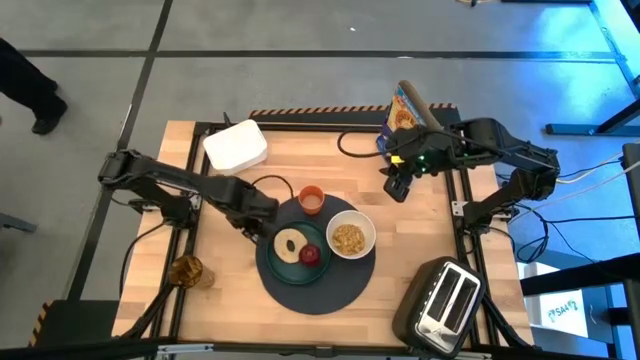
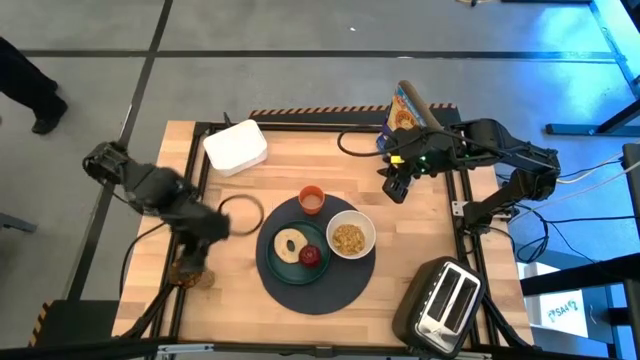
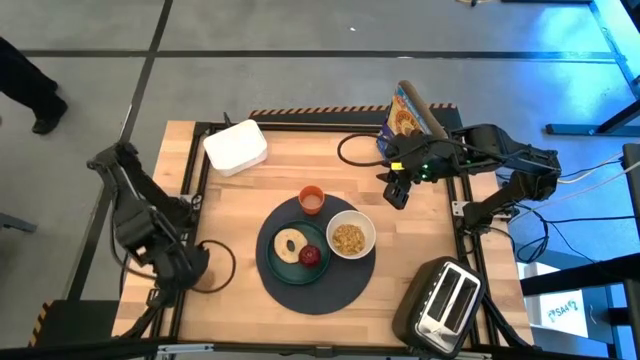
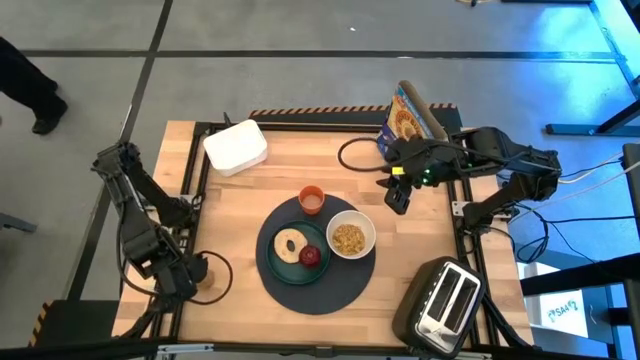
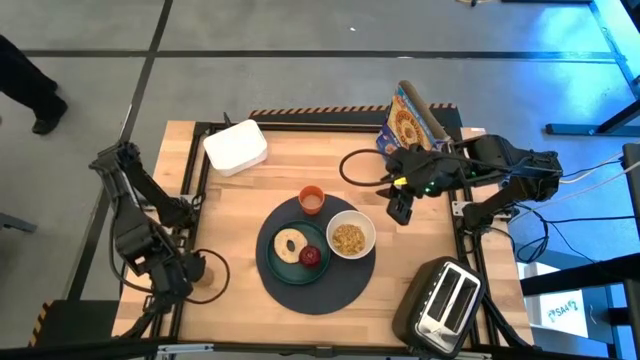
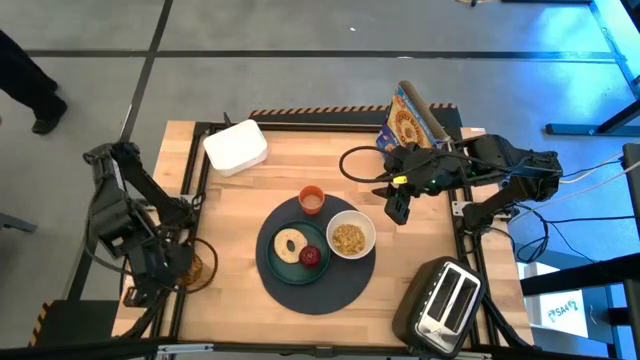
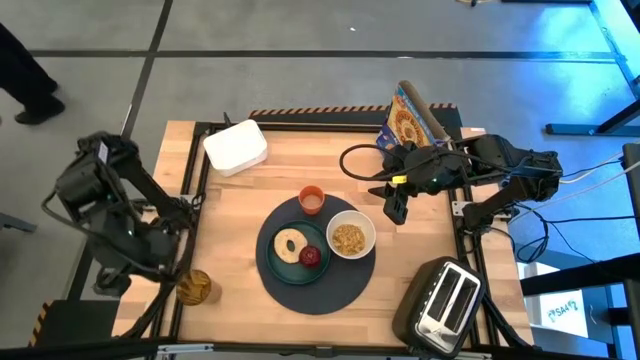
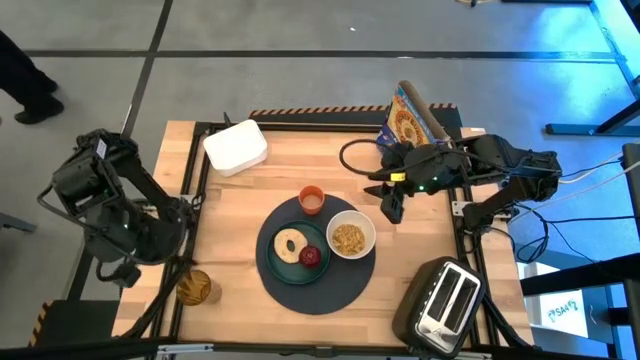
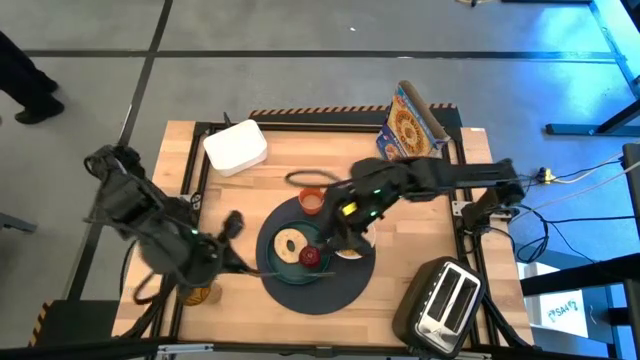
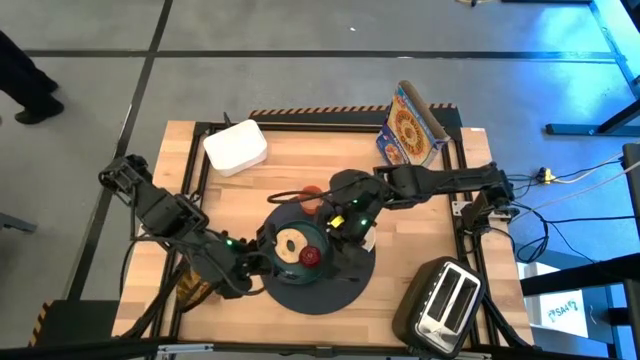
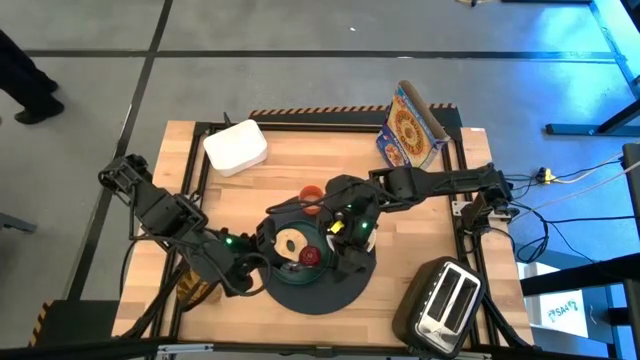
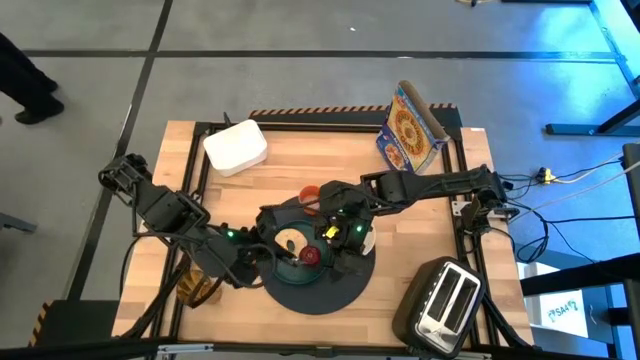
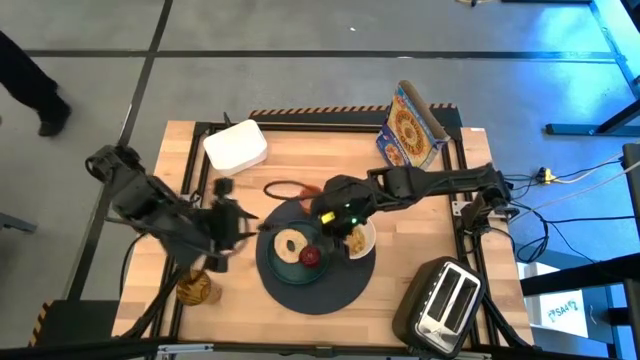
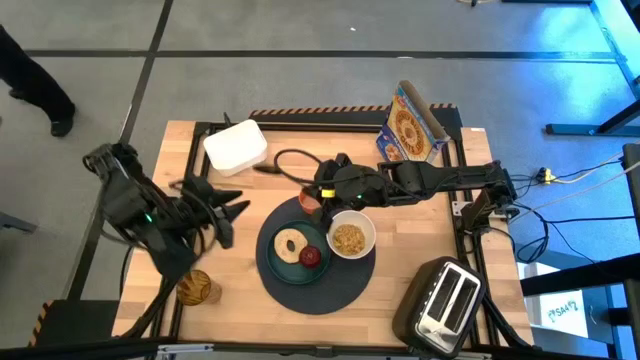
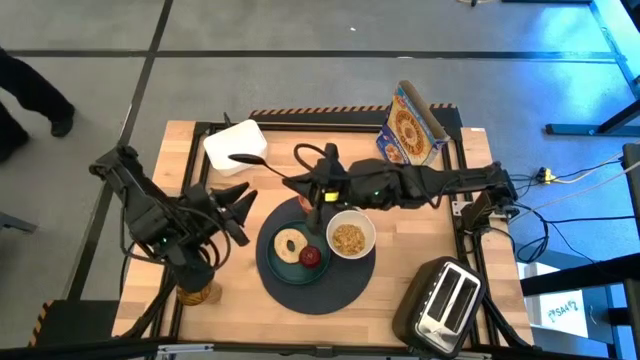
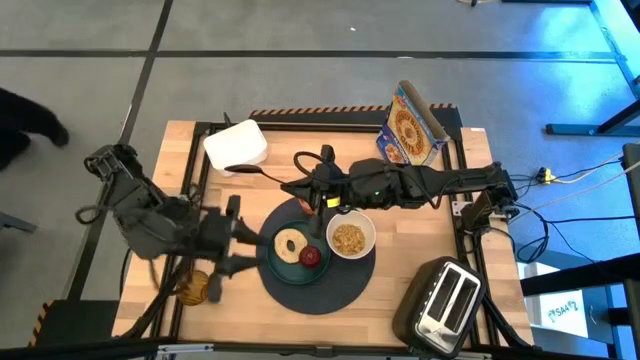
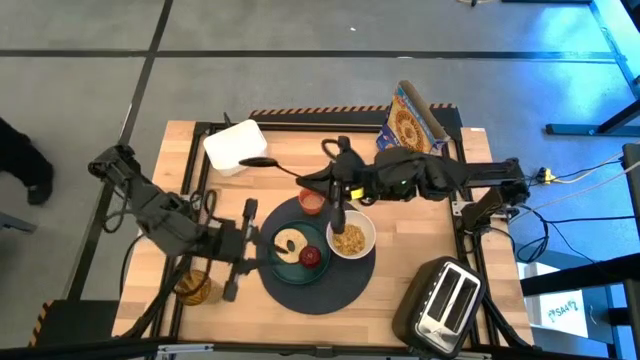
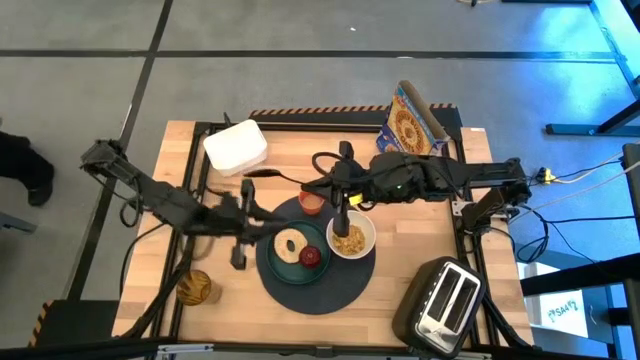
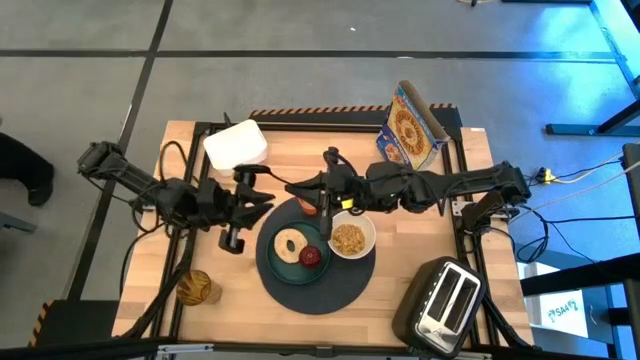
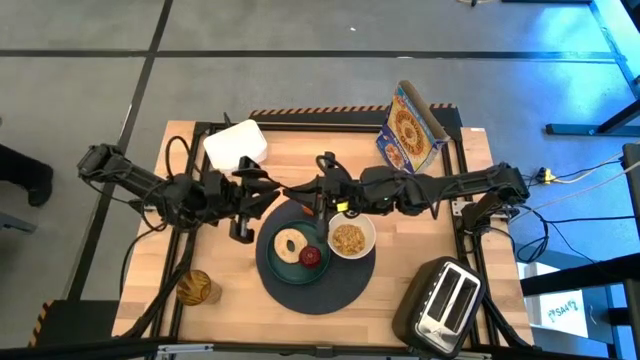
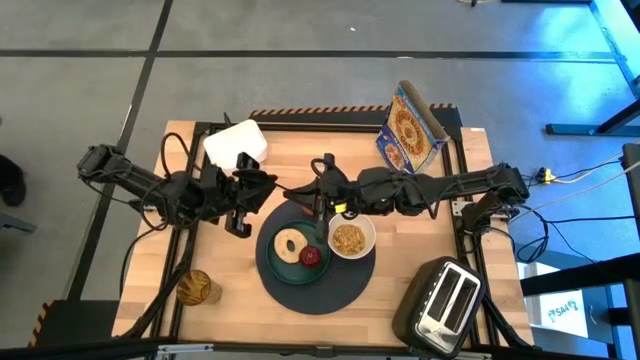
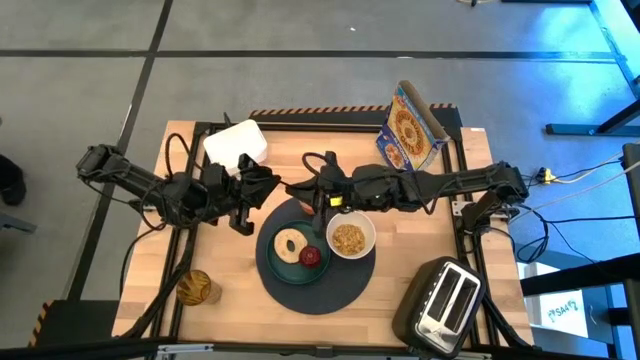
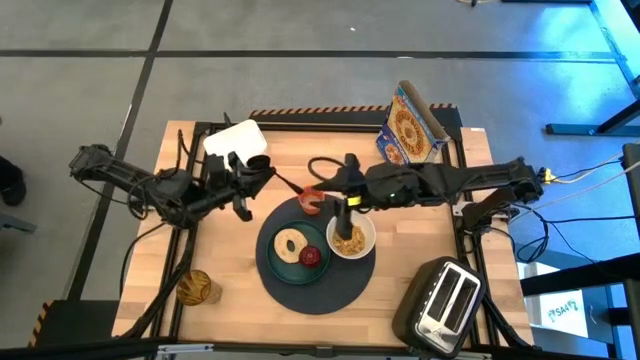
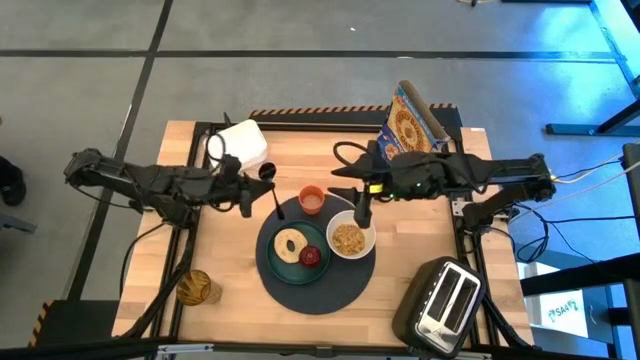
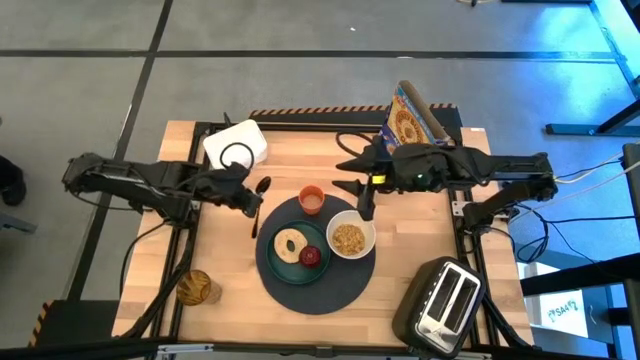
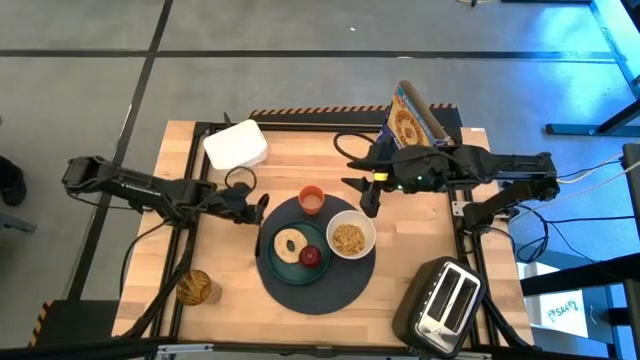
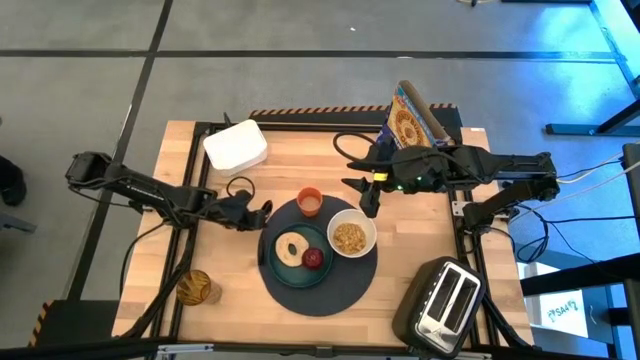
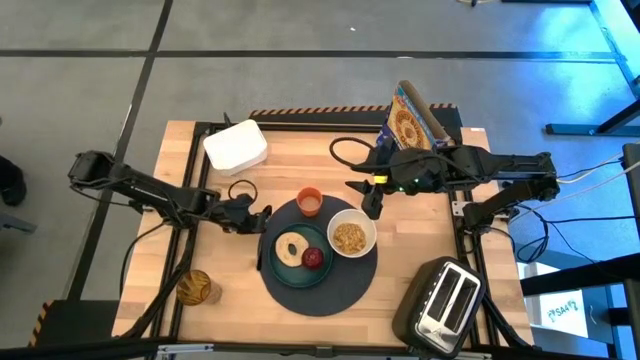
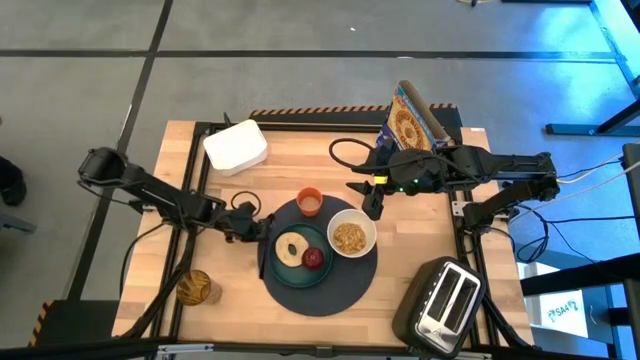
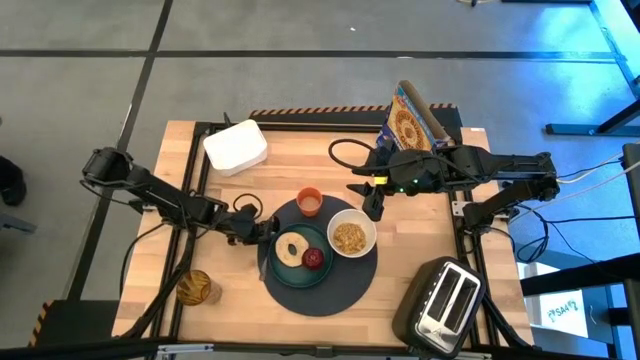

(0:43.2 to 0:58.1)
Task: Arrange a breakfast setting
Put the black spoon on the black table mat to the left side of the blue plate

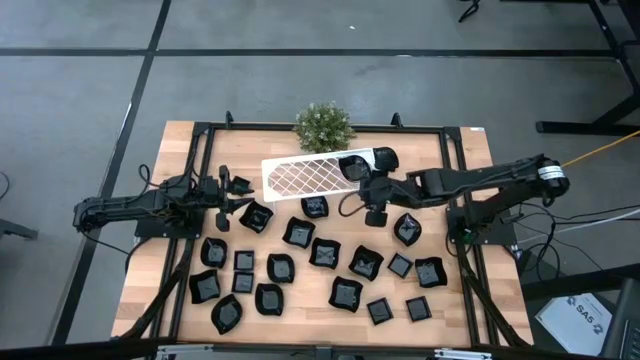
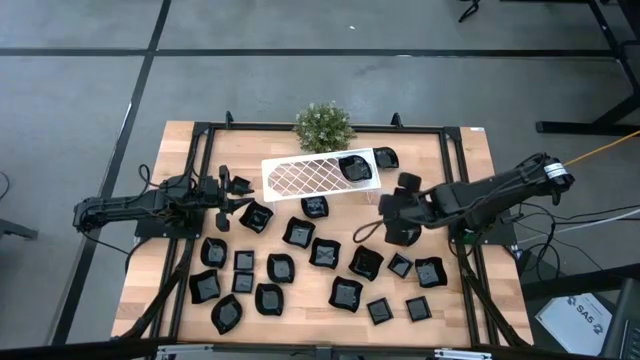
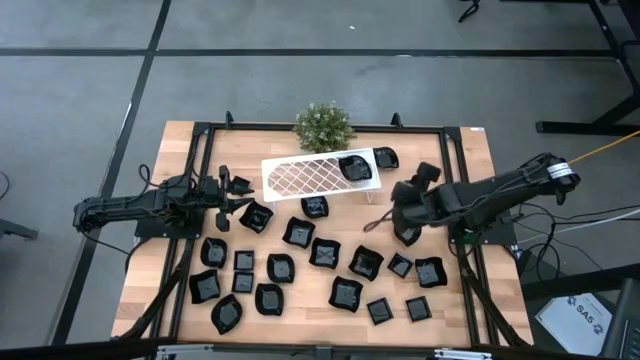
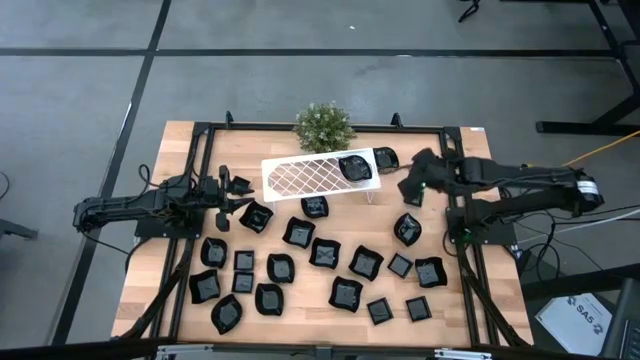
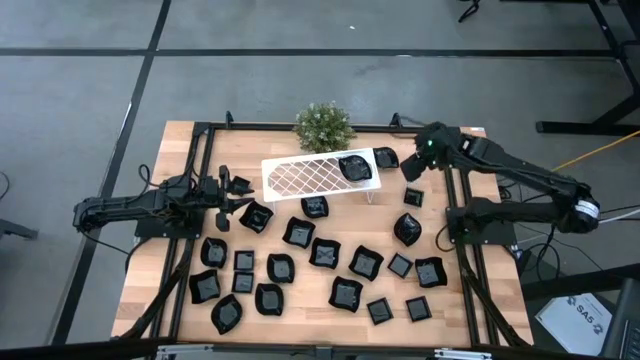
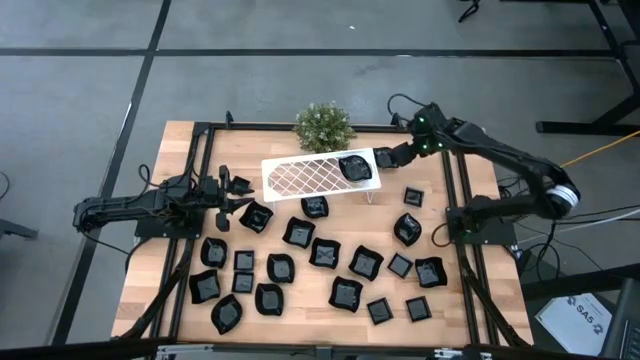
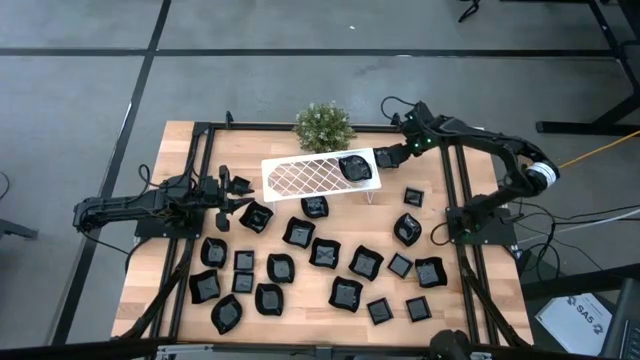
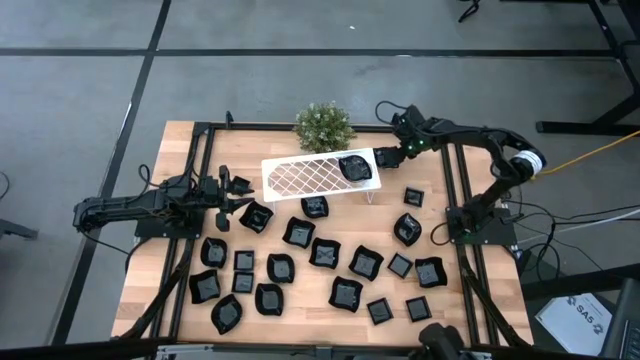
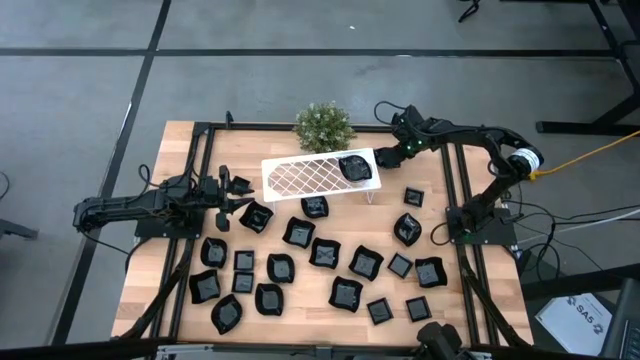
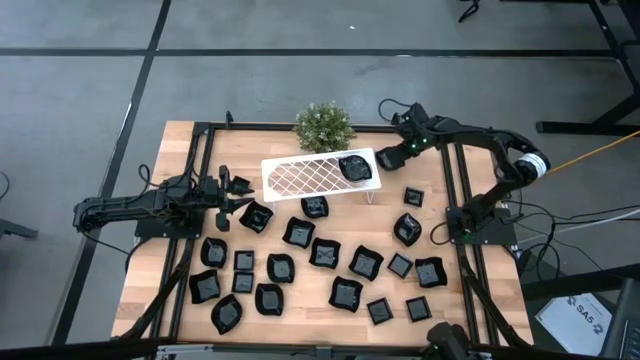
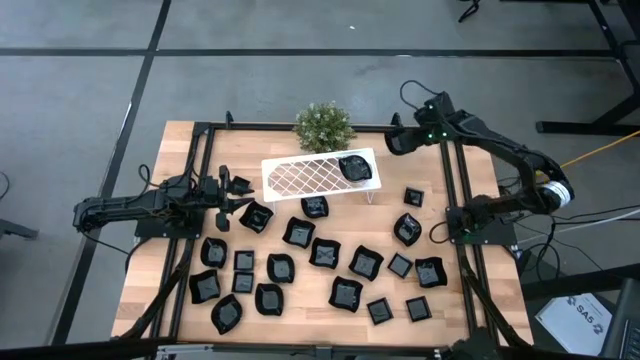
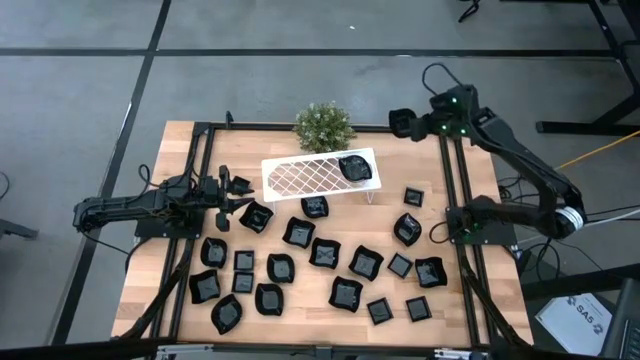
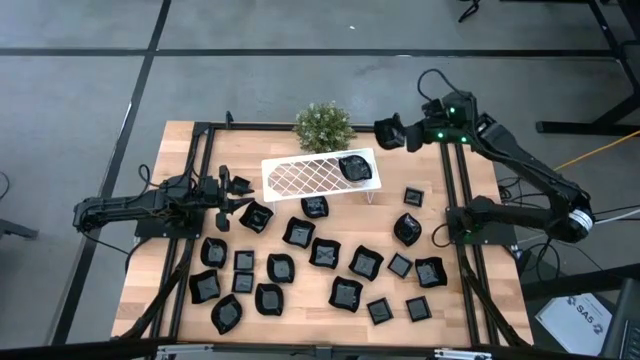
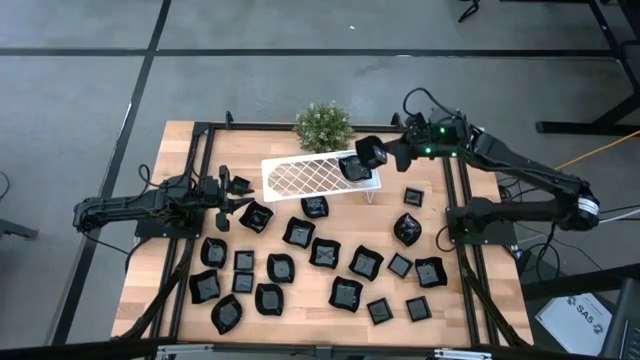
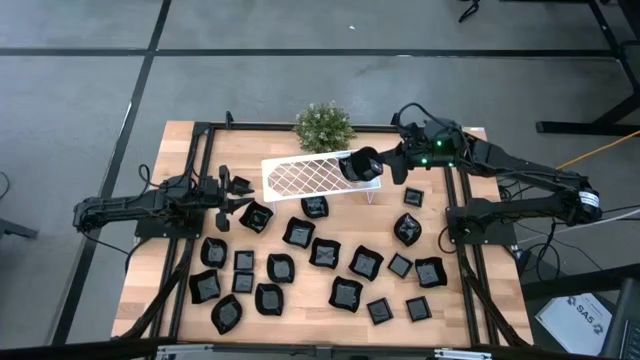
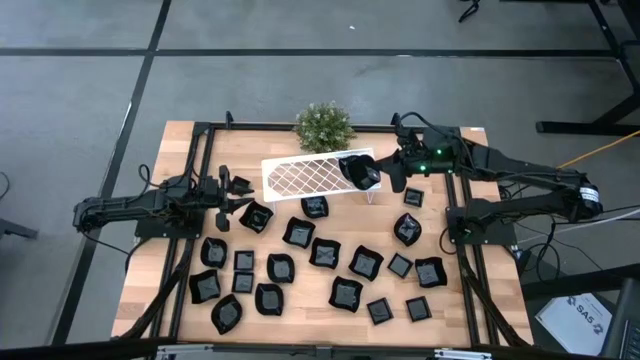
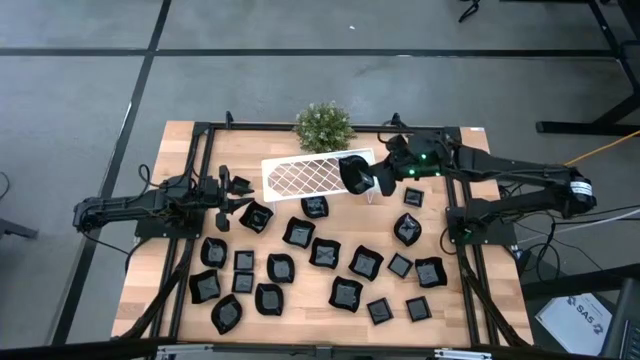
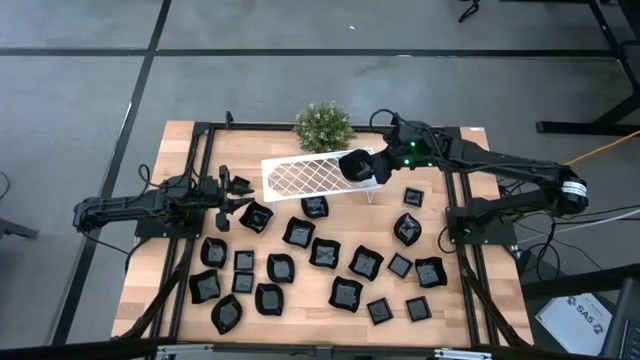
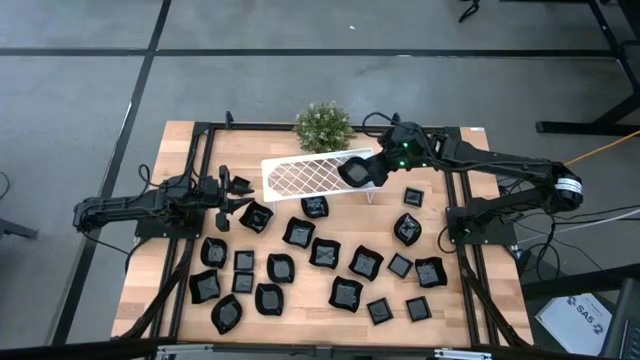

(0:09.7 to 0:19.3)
Task: Pick & Place Mini shaped plates
Stack the leaf shaped plate on top of the leaf-shaped plate on the shelf
